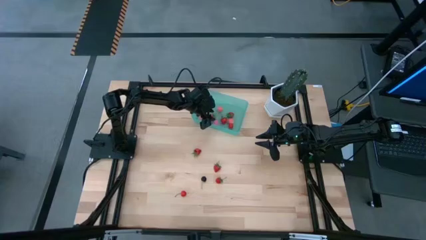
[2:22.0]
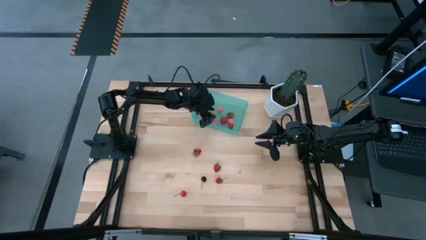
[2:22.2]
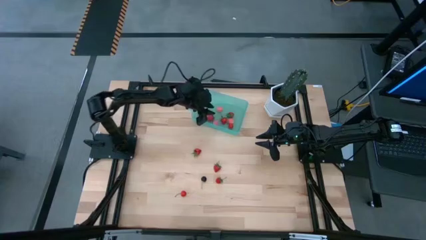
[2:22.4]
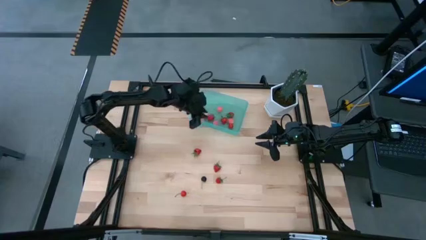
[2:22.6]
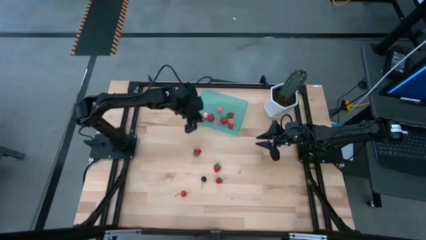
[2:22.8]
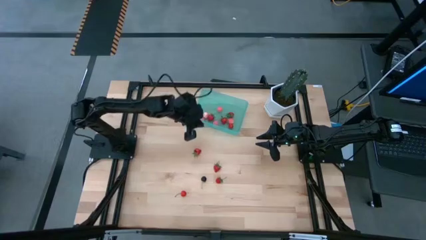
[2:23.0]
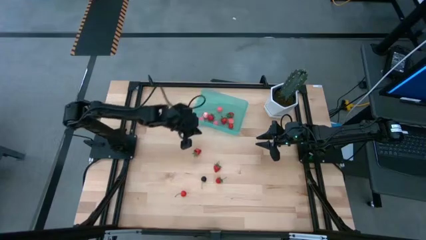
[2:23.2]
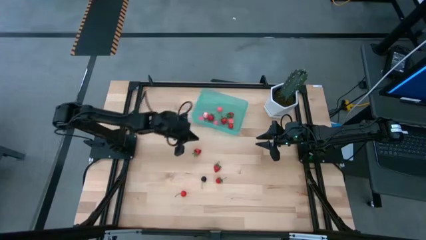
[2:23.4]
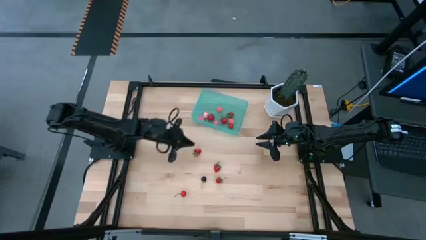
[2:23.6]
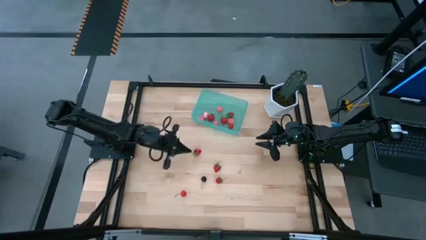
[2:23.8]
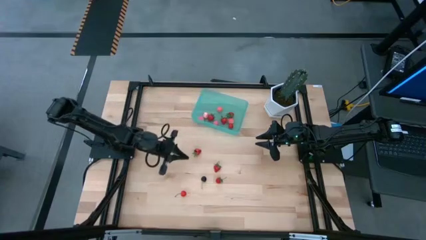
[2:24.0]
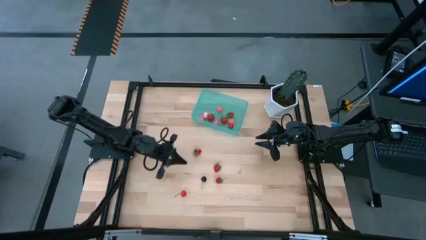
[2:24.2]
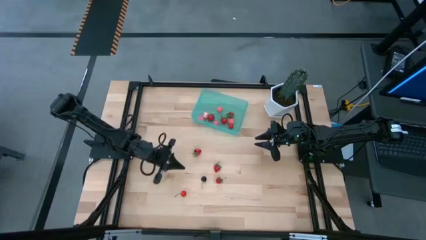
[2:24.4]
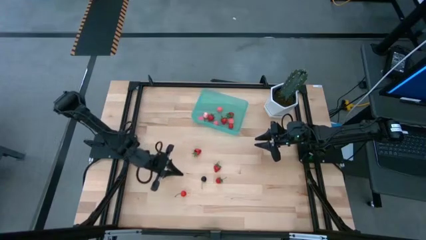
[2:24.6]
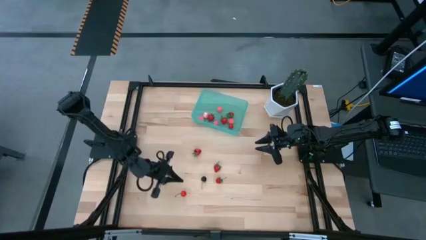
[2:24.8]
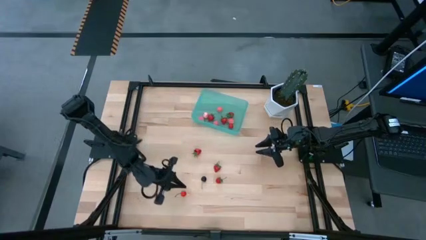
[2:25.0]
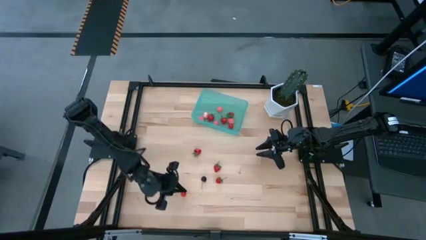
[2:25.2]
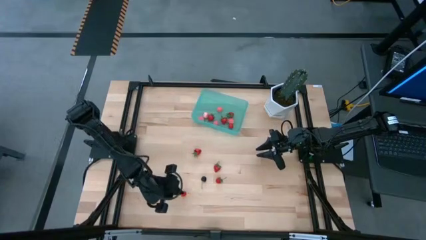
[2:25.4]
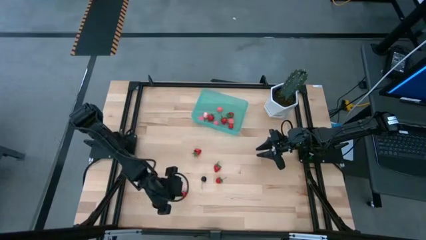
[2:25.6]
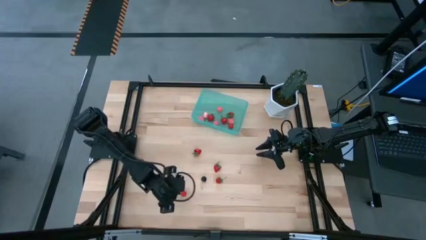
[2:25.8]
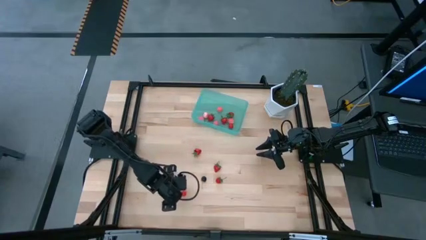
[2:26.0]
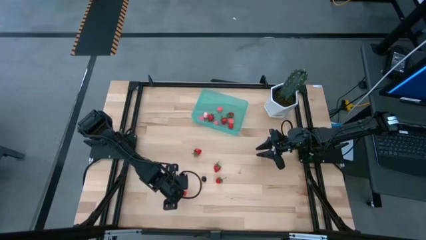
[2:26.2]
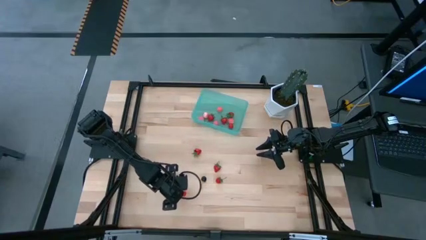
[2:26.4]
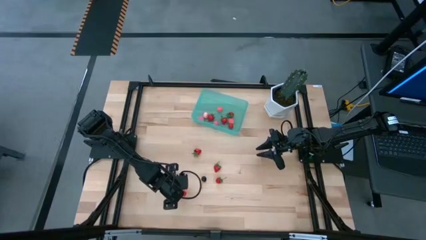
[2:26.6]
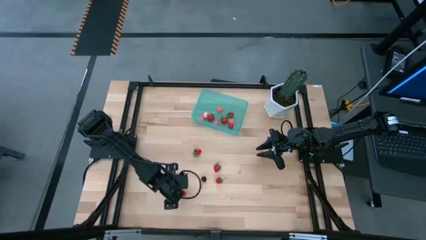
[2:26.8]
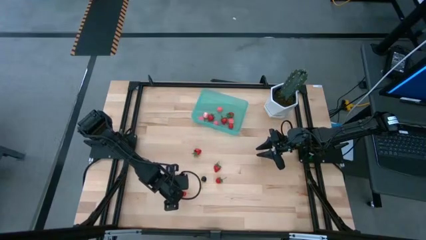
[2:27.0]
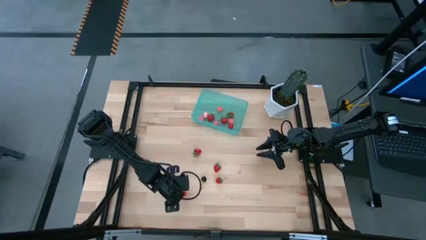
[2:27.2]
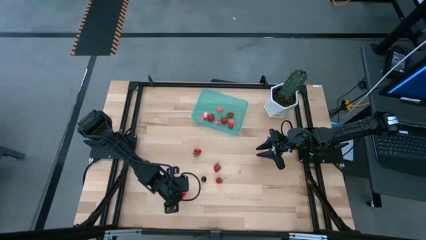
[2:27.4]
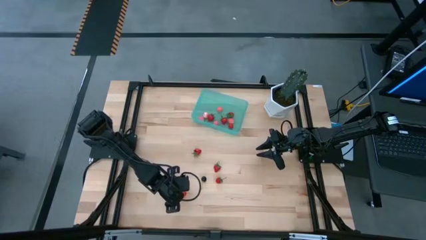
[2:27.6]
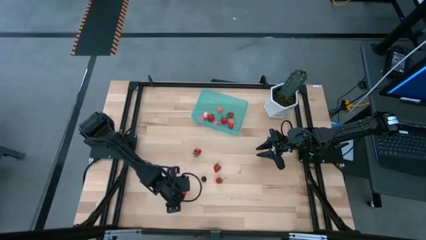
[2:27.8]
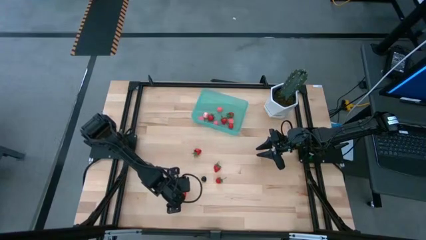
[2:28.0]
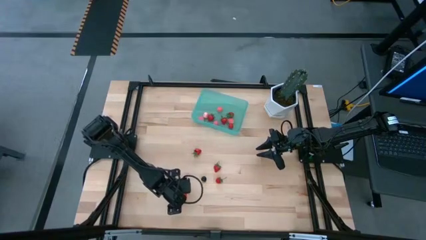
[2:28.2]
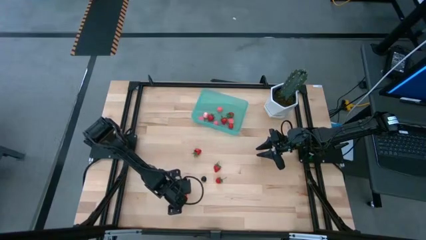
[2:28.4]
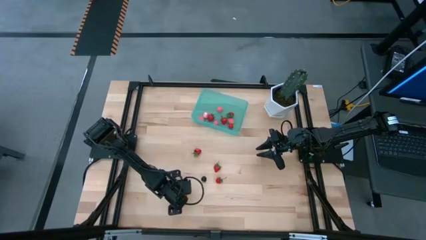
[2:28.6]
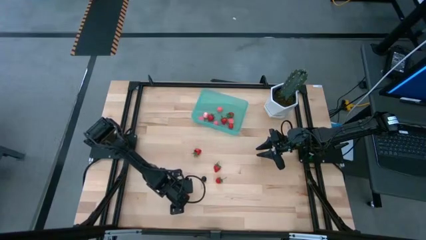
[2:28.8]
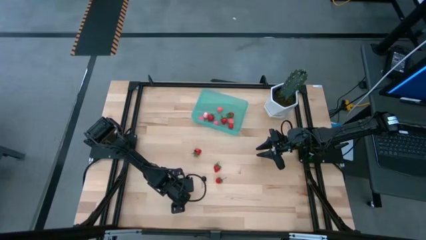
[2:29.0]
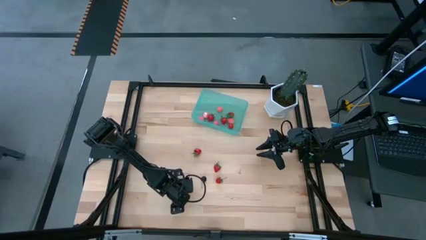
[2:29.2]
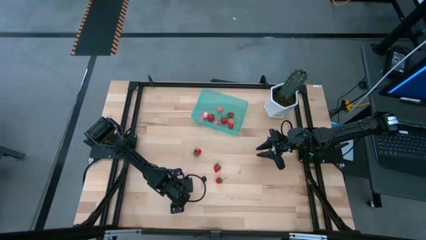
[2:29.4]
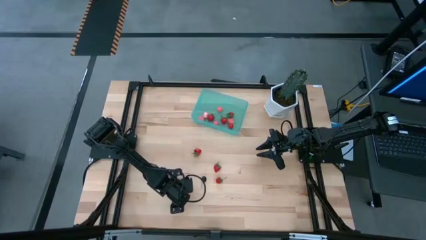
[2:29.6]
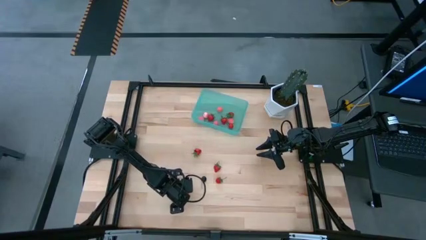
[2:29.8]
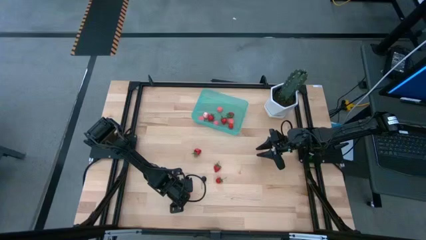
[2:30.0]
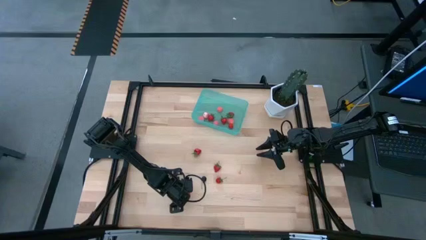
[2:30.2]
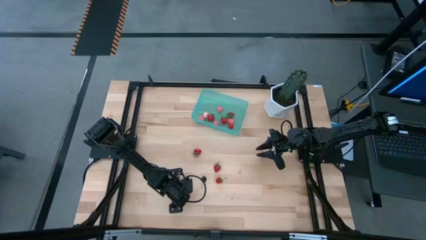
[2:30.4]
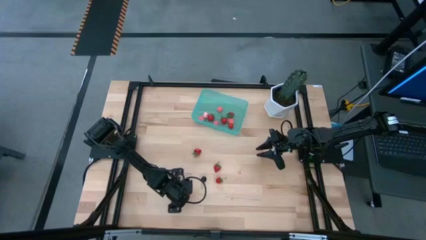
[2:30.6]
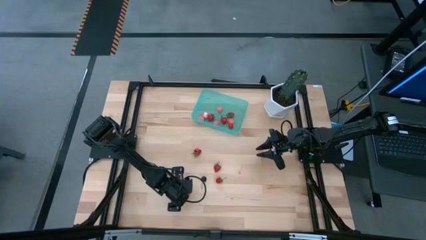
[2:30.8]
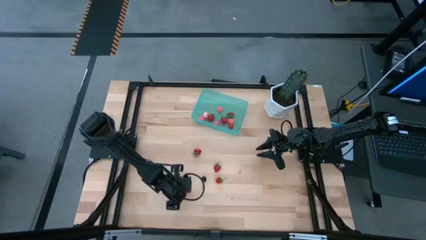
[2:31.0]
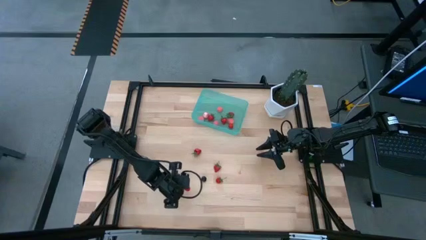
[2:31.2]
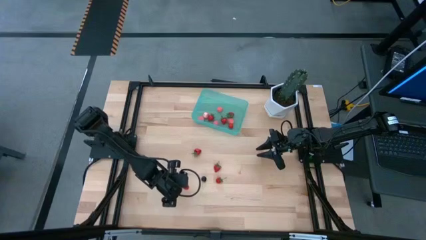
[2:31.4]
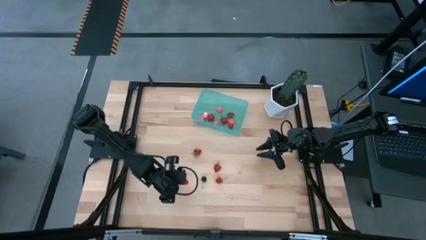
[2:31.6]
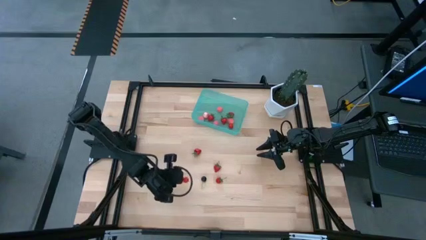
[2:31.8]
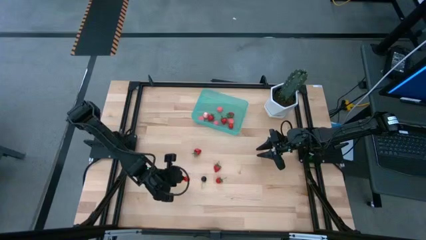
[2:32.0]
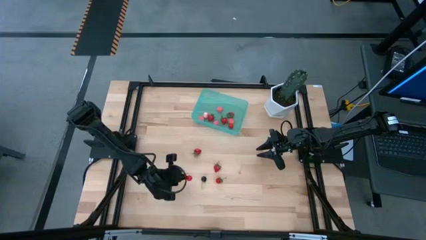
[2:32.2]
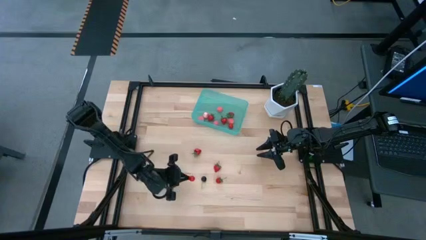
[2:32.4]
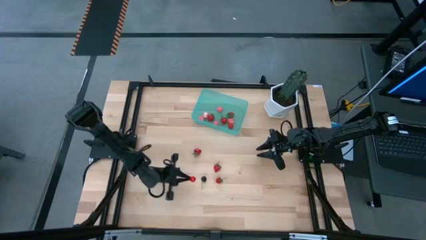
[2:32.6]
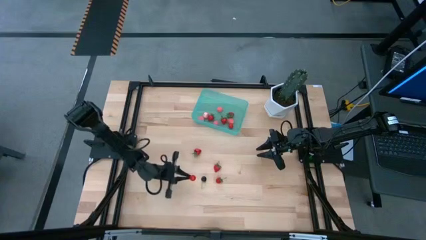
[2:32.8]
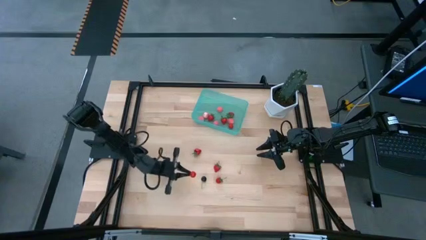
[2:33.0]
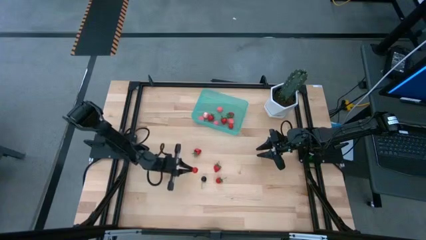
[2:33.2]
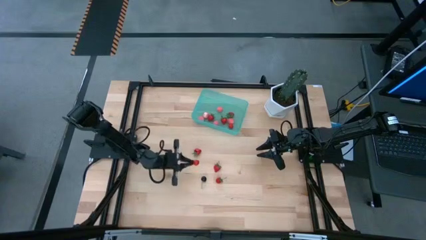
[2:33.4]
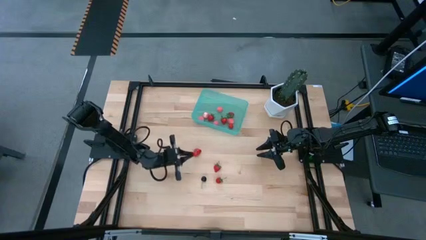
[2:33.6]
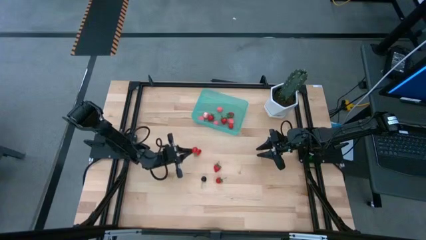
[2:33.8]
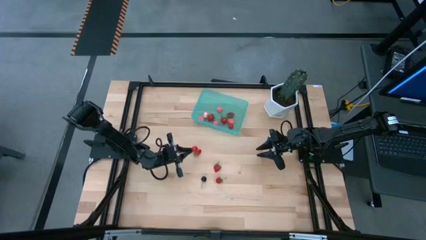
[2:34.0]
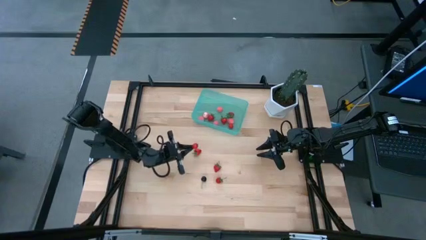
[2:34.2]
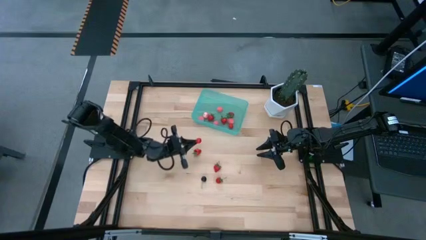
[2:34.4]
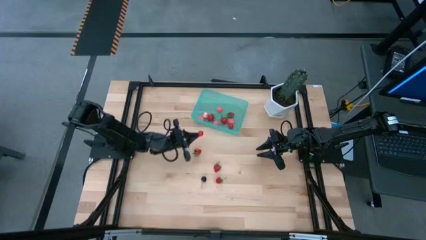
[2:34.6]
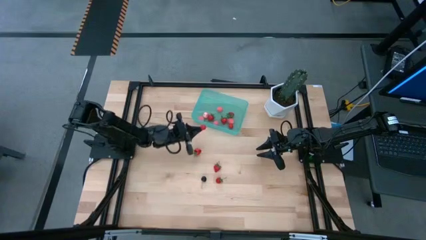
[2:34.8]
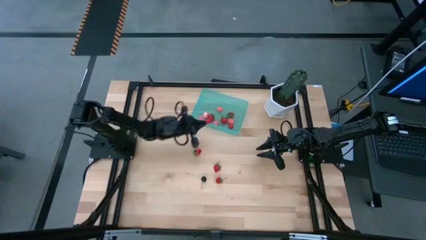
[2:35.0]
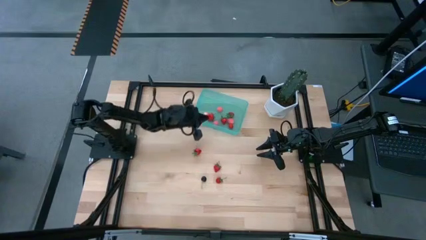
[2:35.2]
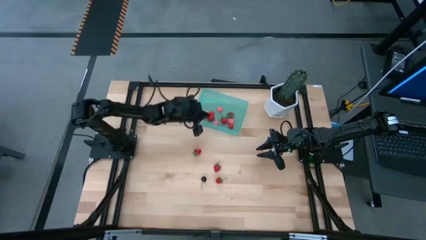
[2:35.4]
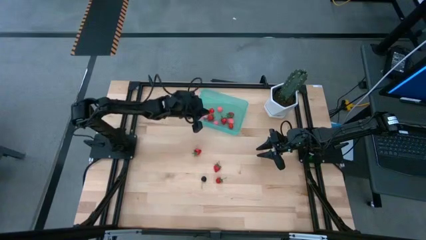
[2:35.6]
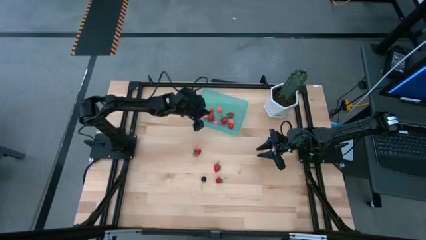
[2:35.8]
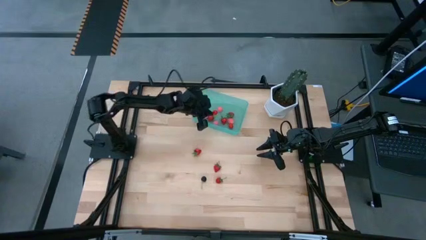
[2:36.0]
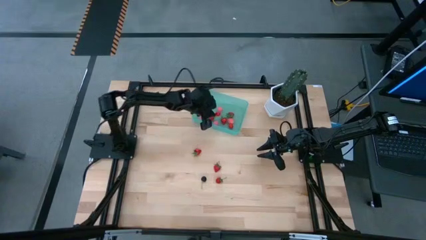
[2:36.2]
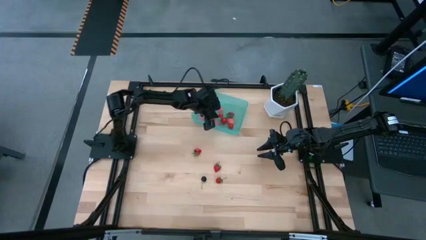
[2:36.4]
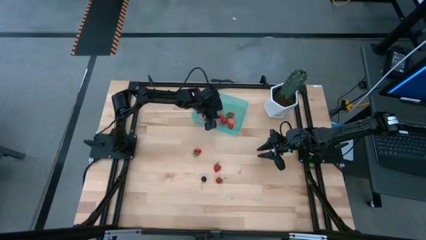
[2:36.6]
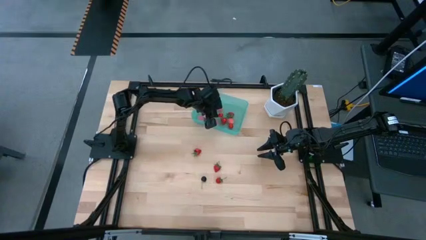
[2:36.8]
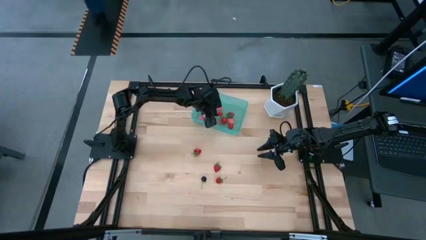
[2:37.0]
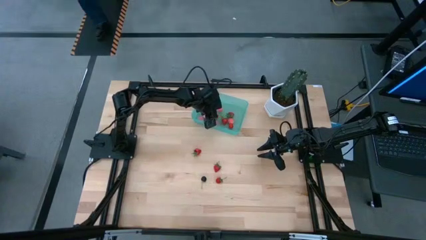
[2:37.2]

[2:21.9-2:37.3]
Task: Pick and placing Produce into tupperware
Put the red cherry into the light blue bin

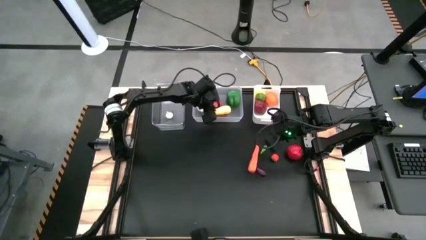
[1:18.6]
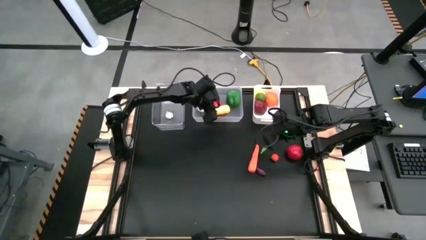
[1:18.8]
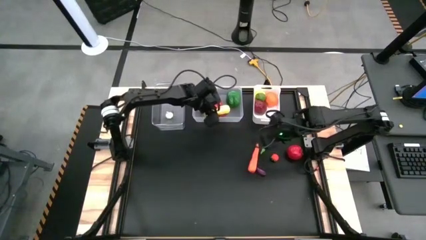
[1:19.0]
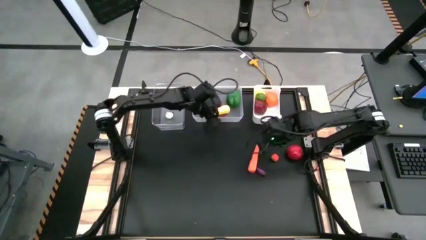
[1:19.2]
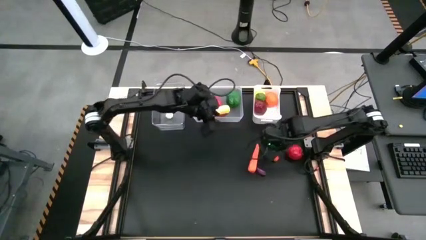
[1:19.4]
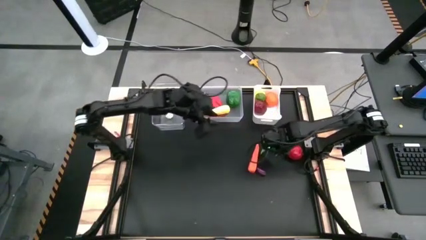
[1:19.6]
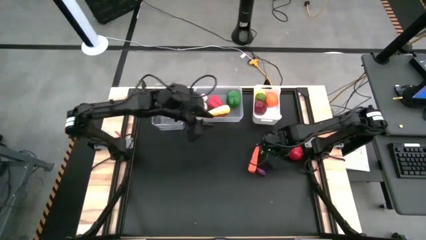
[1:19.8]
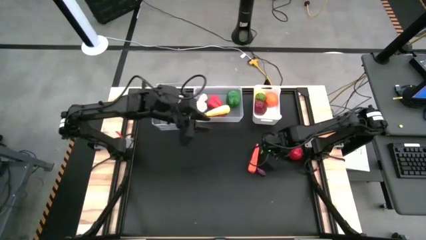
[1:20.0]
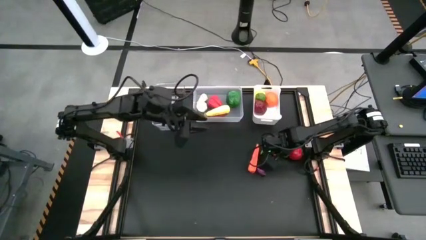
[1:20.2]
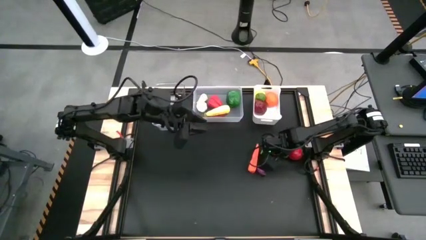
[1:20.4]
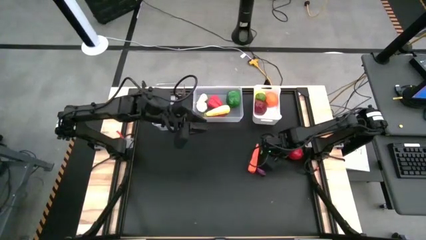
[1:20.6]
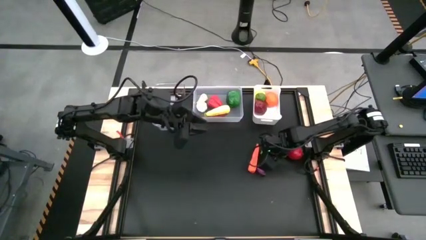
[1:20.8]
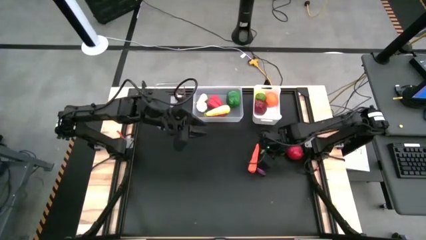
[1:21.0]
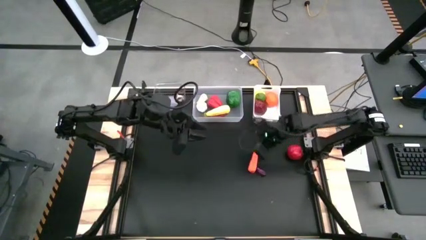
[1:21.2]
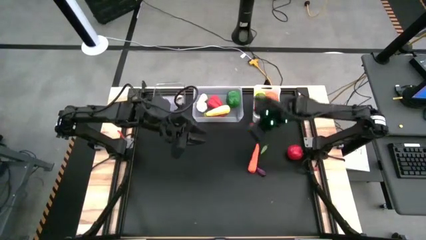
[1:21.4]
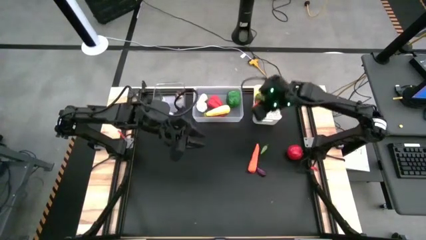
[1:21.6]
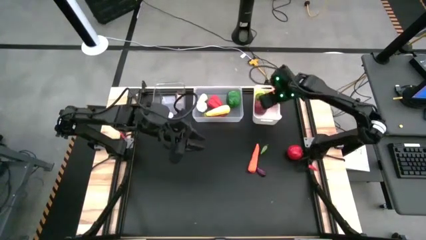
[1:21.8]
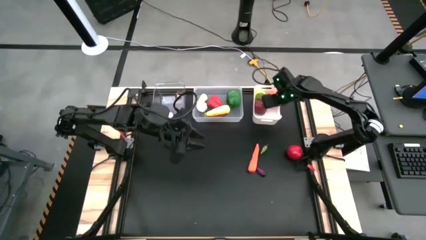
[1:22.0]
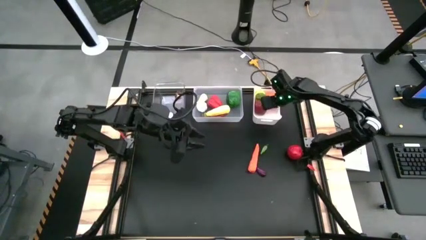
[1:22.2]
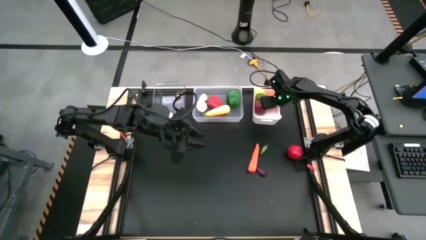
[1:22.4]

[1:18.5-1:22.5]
Task: Sort produce into baskets
Put the pink persimmon into the white bin
